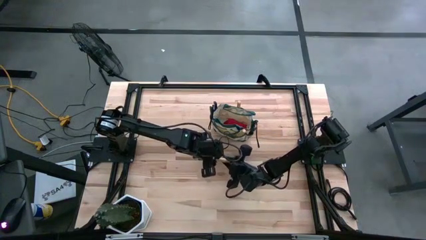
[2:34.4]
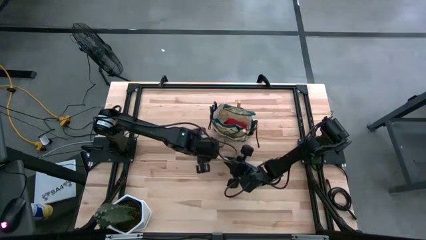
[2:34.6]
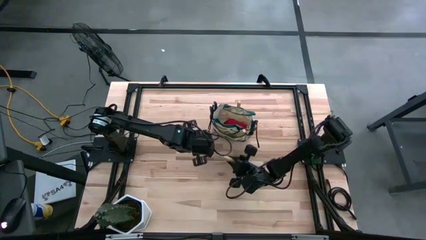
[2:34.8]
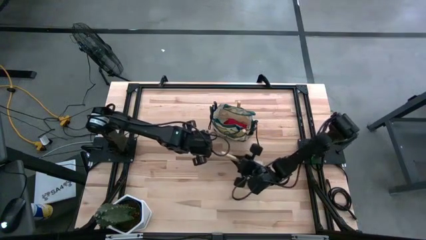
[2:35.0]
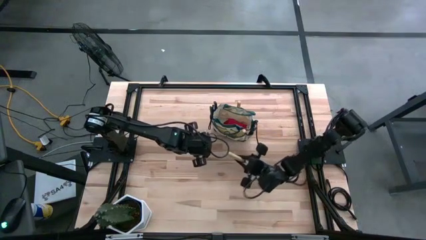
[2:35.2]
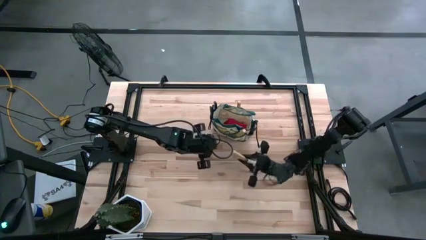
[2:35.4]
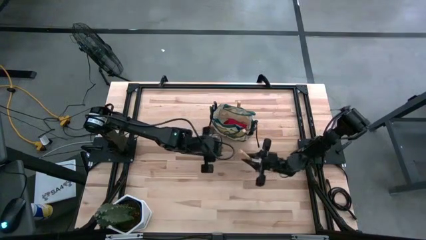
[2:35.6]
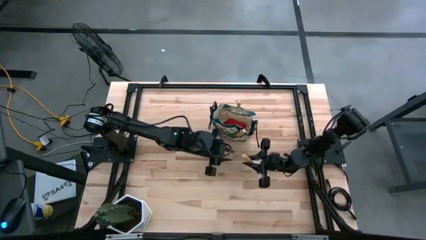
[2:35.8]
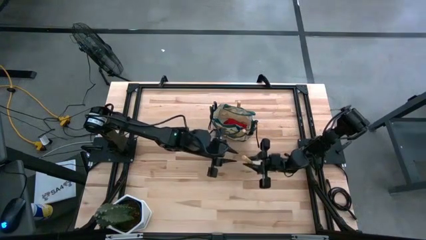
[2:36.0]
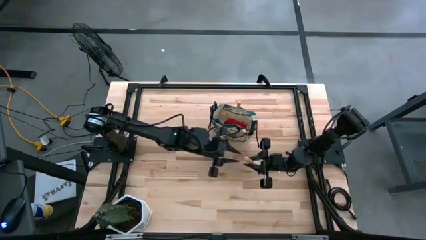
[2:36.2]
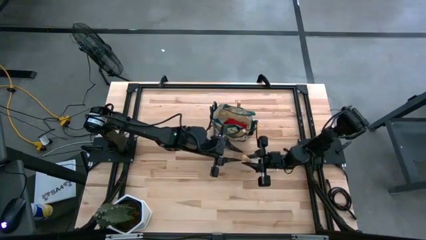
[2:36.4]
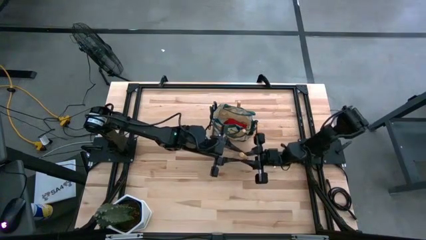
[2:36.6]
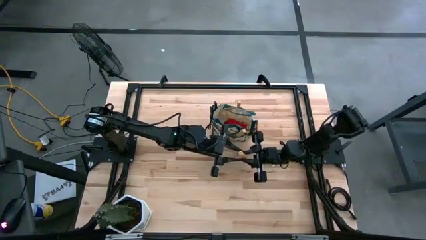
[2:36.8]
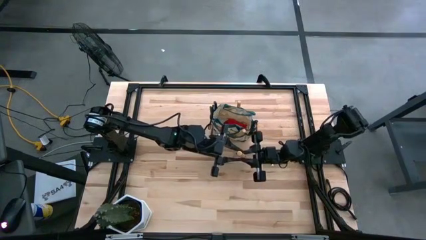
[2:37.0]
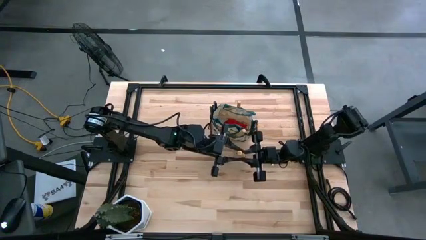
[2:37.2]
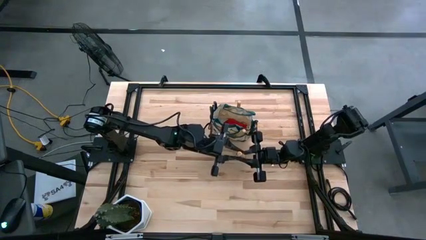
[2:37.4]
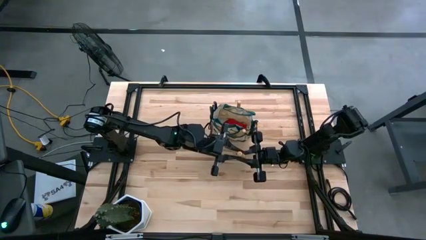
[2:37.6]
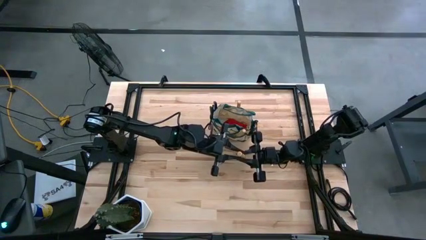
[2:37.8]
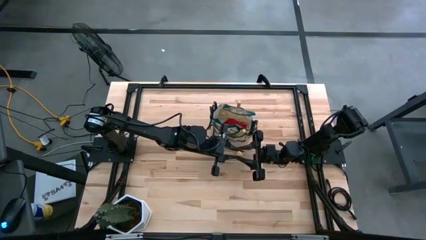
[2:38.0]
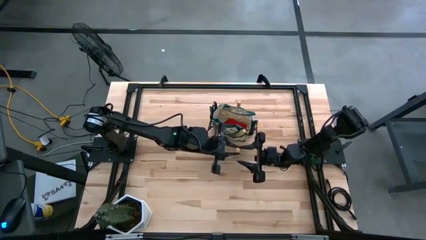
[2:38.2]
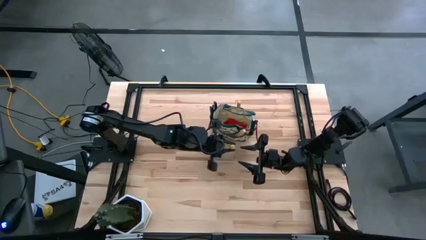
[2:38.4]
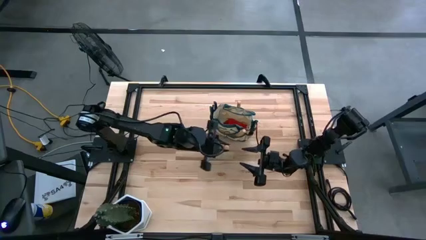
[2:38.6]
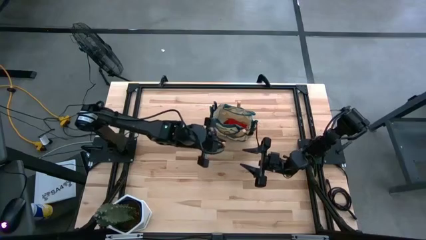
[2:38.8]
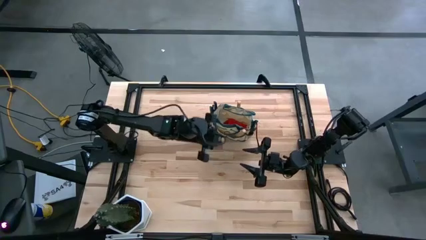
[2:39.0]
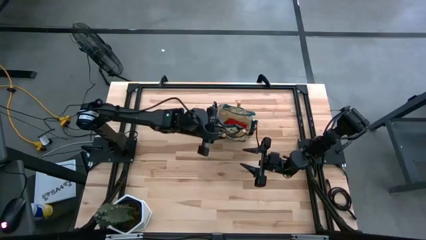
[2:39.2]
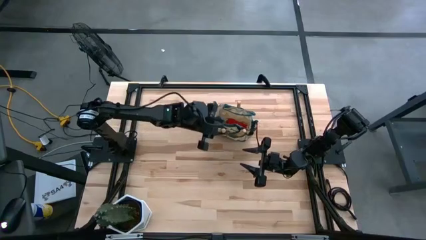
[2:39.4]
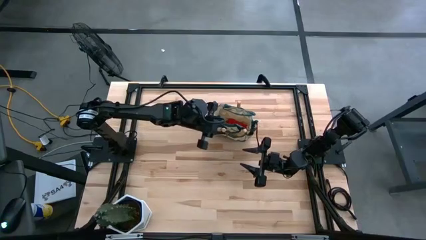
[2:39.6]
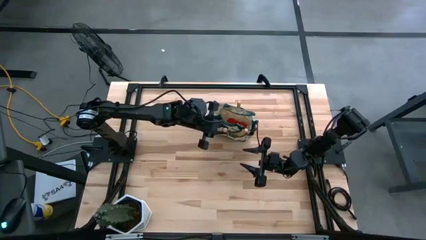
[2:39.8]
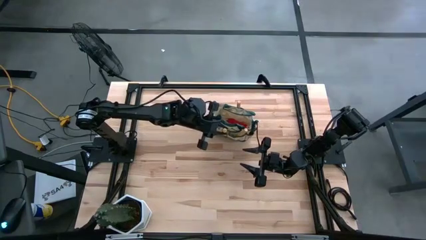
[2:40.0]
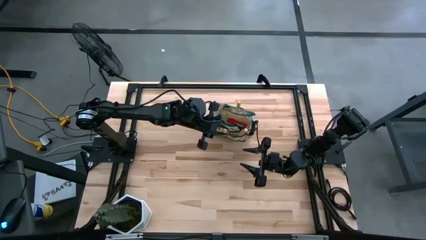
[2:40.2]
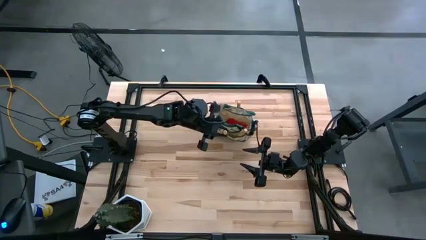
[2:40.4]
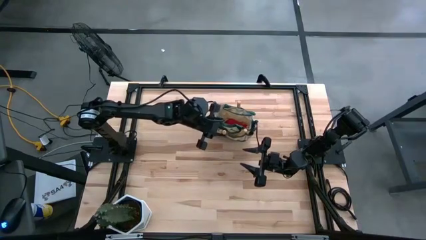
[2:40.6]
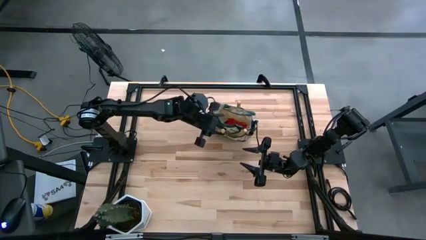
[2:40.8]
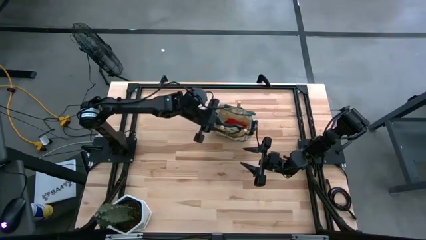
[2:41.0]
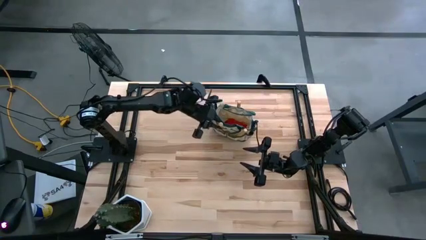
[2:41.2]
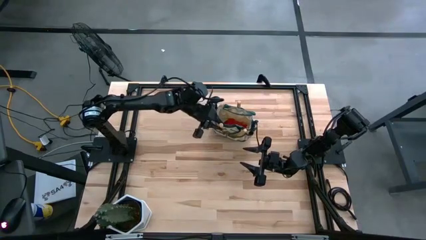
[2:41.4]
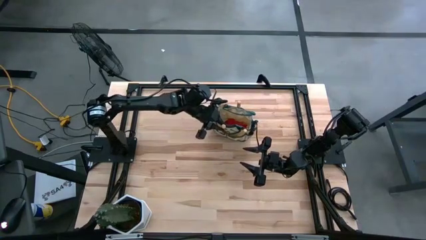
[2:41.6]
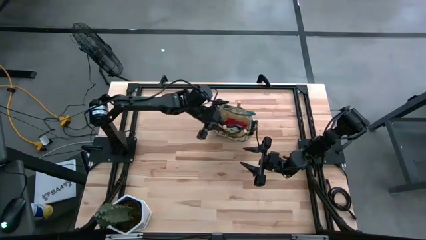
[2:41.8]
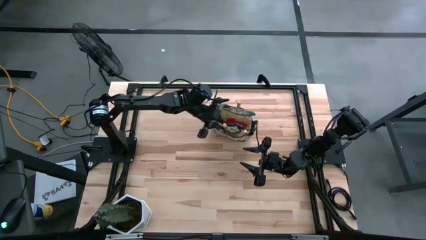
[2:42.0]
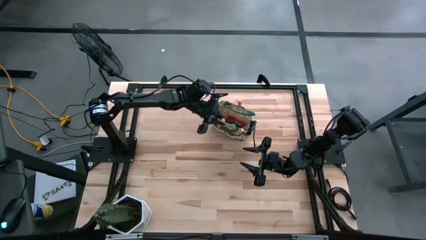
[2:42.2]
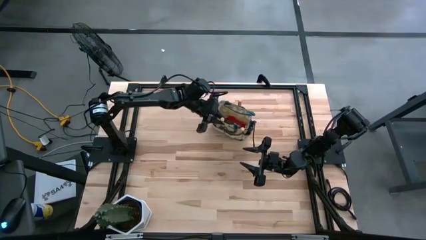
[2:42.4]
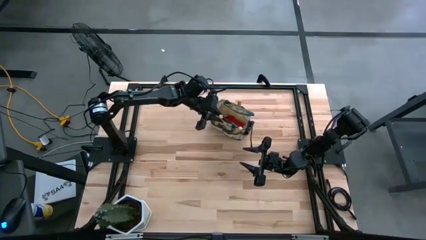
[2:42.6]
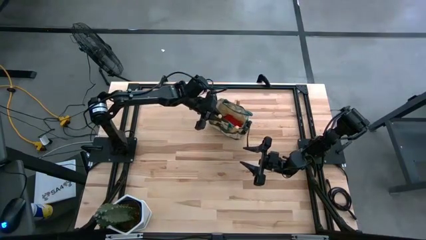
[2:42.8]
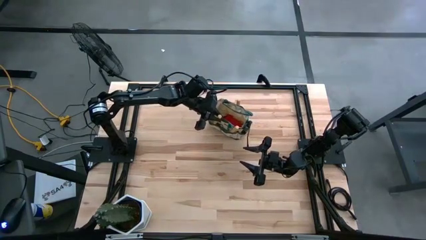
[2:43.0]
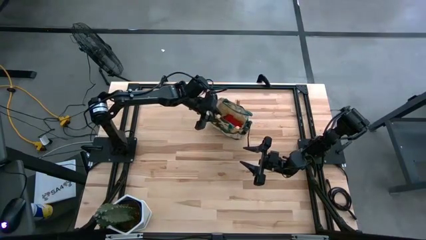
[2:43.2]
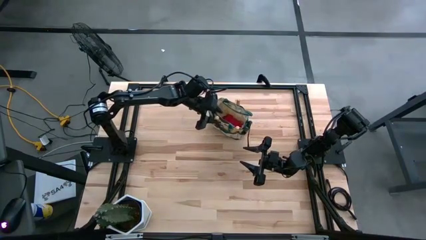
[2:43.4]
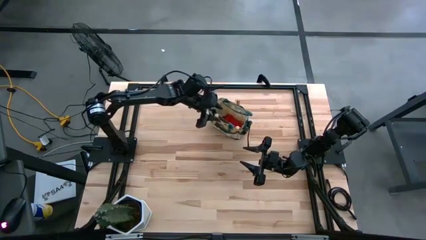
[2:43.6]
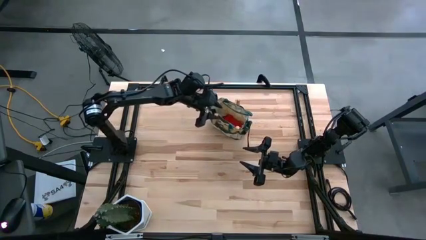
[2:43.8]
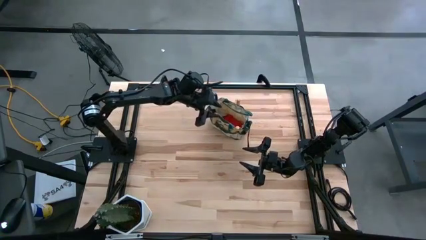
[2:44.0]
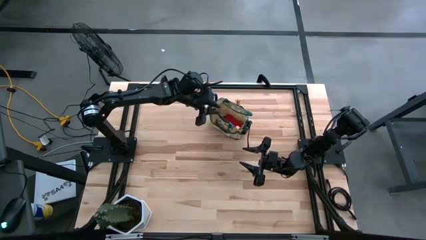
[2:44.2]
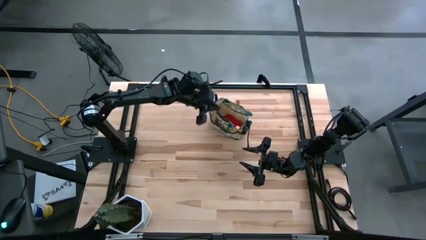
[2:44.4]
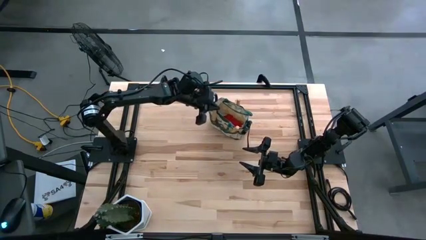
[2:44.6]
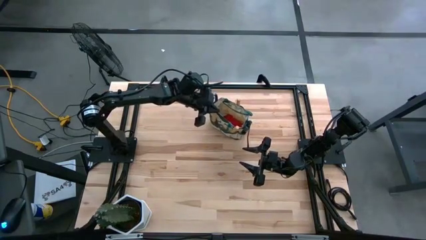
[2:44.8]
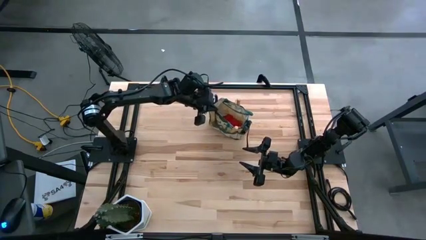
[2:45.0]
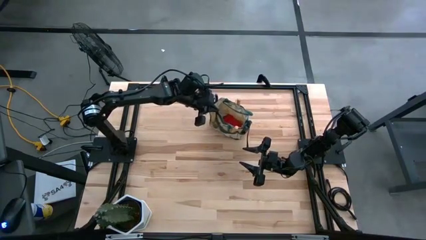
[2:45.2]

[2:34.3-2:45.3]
Task: Pick & Place Garden tools in Gardening bag
Put the brown trowel into the gardening bag

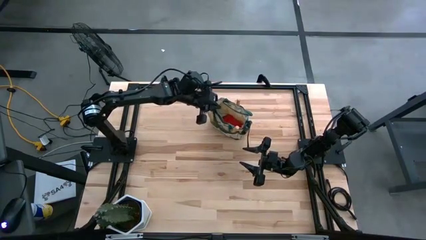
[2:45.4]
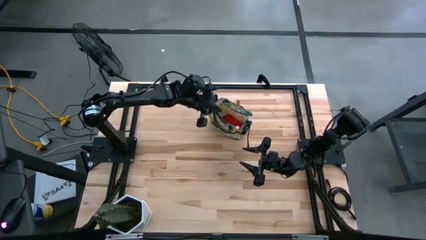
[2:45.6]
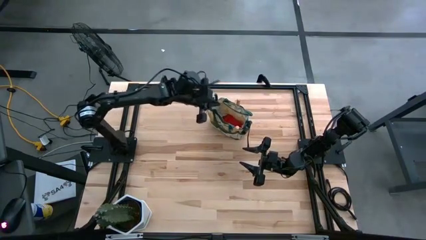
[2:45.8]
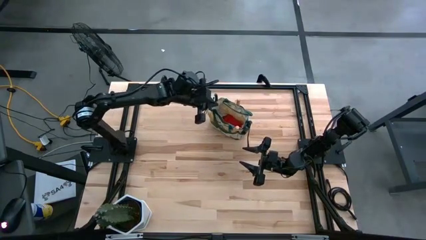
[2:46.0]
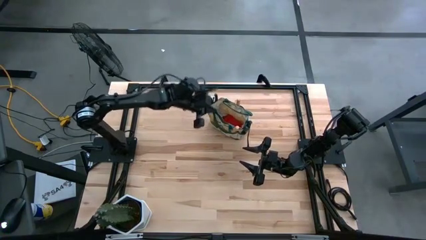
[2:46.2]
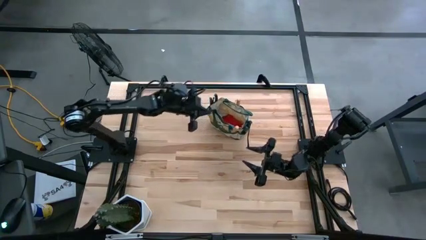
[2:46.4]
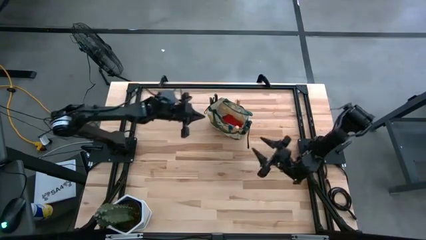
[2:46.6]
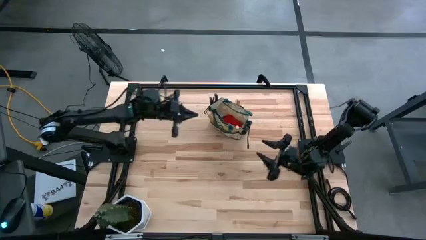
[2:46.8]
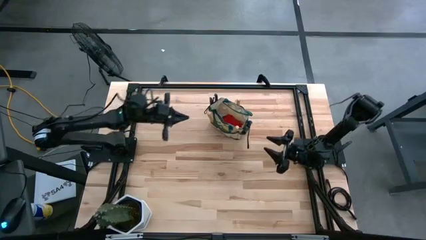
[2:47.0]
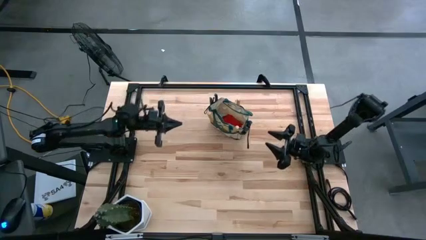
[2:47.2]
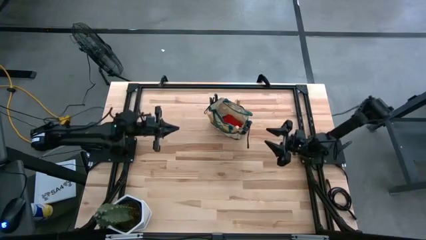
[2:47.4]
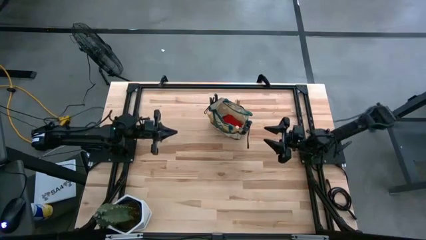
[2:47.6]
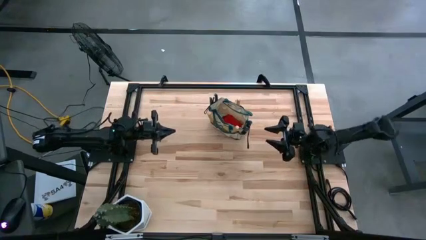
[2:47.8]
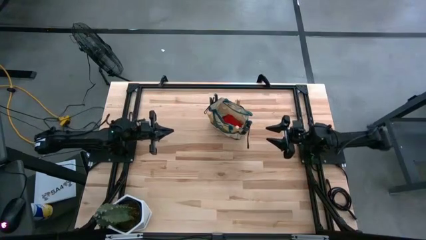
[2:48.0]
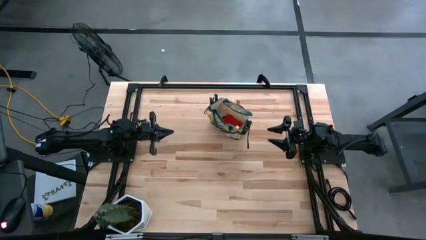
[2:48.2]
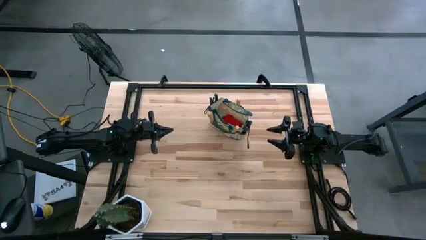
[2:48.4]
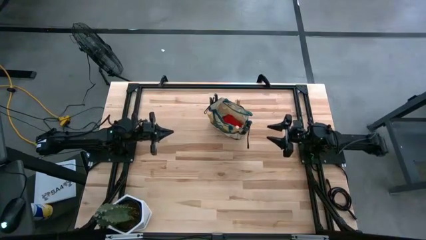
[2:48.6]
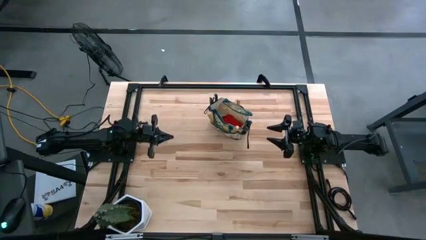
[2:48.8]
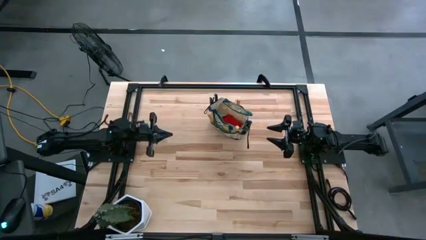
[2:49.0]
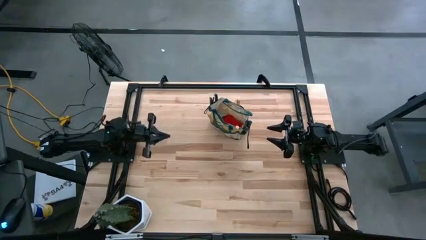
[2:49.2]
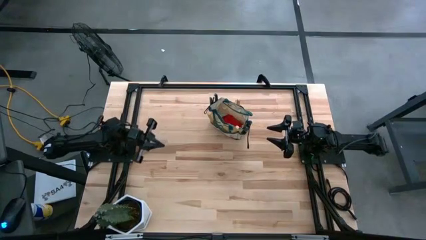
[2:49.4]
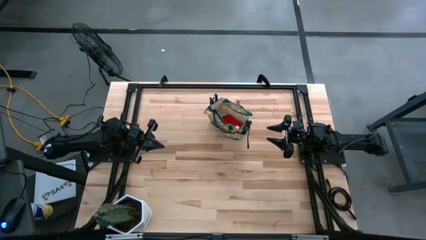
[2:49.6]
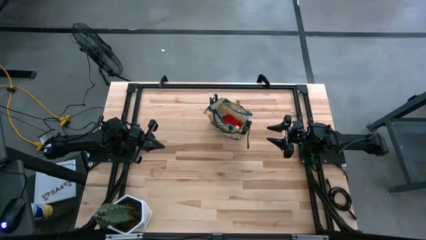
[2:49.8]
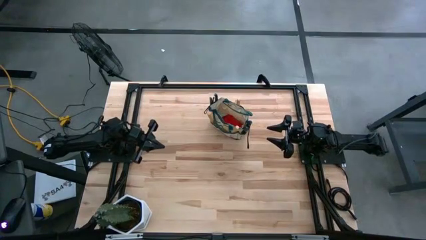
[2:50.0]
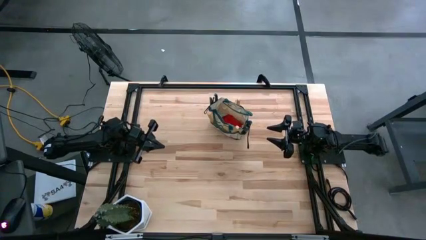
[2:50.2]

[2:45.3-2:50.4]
Return to Home Position

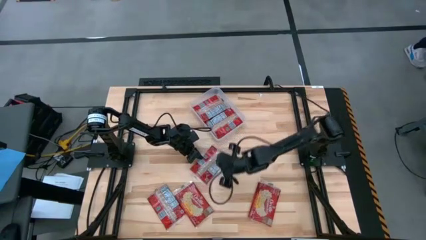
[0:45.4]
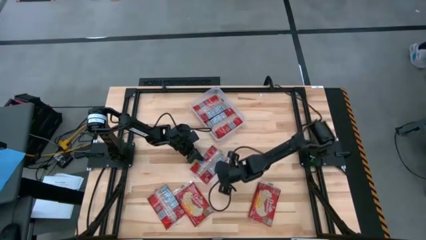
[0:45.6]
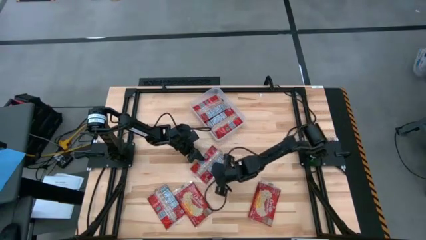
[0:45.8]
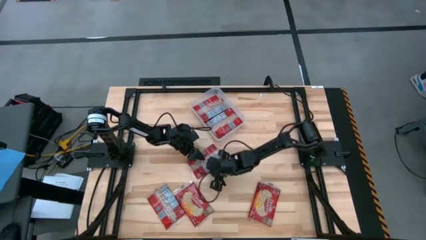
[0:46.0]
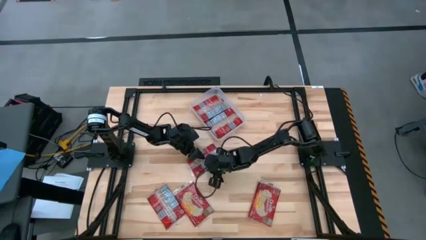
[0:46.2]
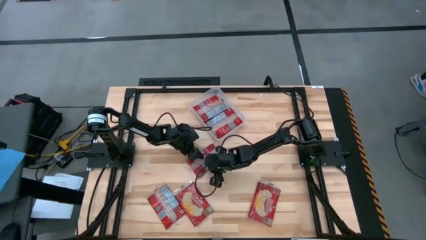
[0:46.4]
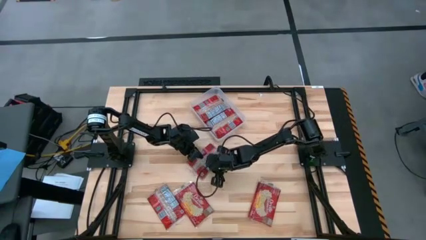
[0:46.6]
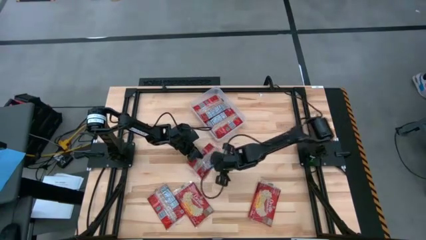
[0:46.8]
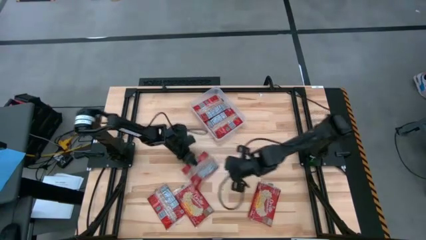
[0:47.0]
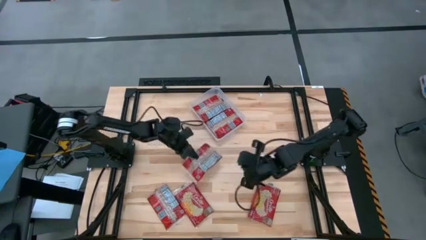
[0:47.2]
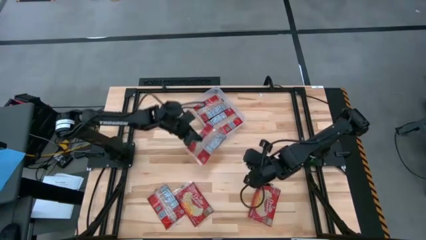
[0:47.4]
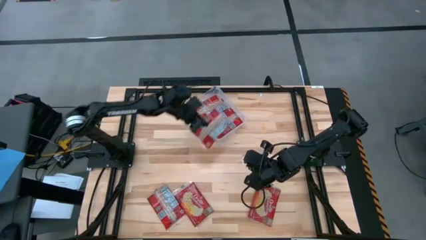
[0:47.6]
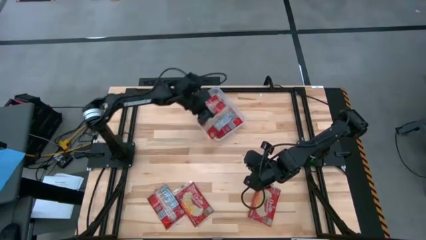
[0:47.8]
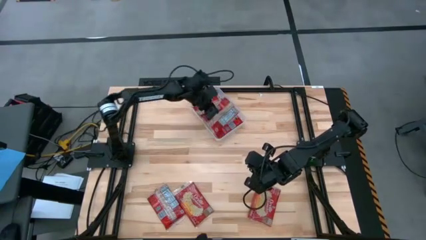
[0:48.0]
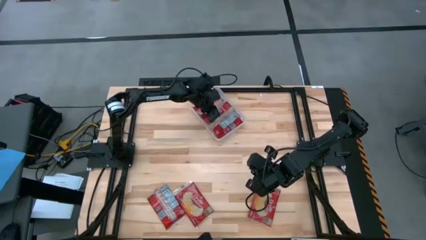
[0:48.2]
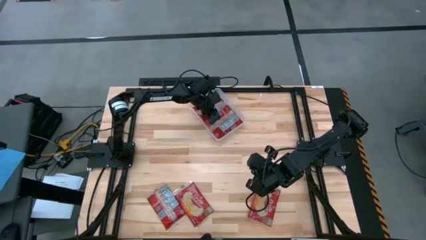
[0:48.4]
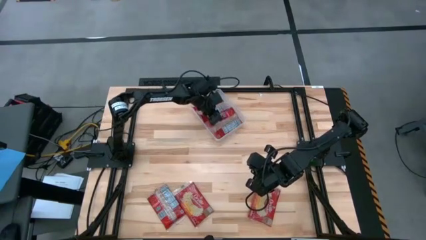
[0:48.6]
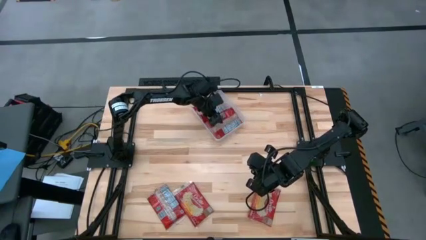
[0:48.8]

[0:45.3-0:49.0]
Task: Sort popcorn bags into baskets
Put the red popcorn bag into the white bin
